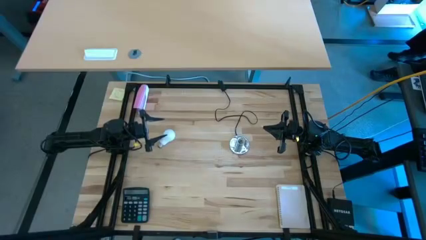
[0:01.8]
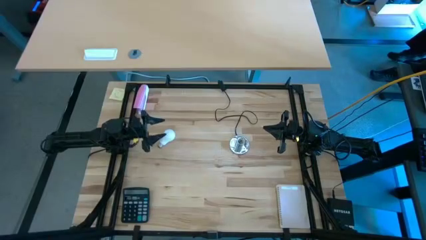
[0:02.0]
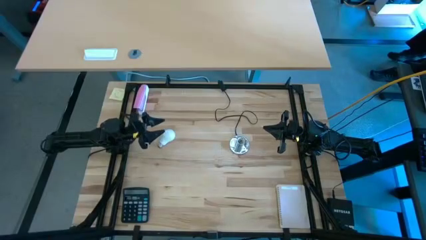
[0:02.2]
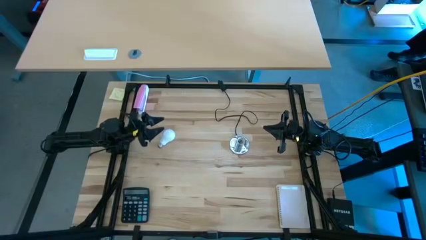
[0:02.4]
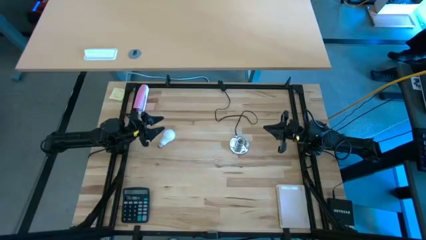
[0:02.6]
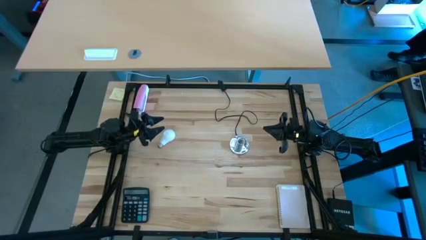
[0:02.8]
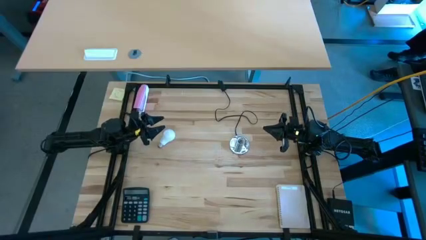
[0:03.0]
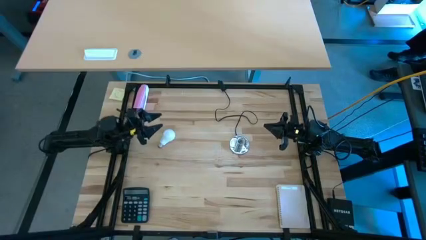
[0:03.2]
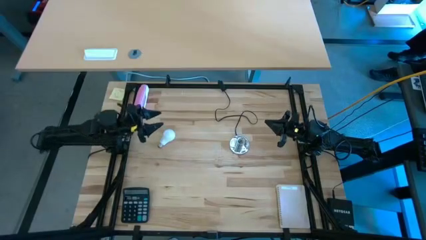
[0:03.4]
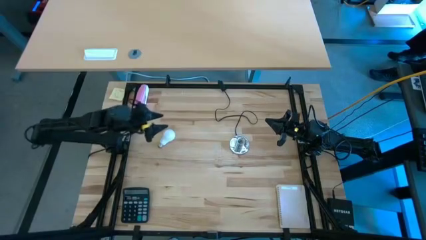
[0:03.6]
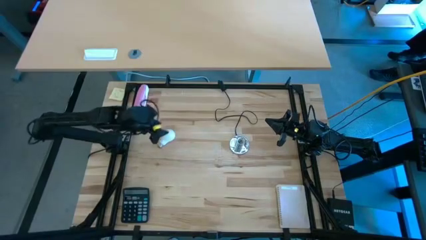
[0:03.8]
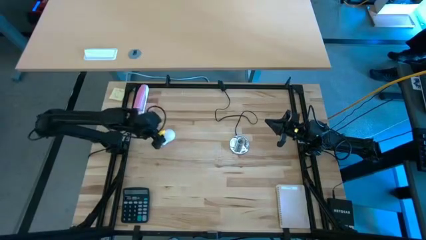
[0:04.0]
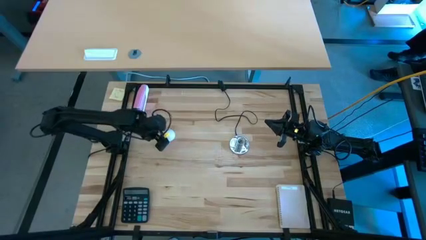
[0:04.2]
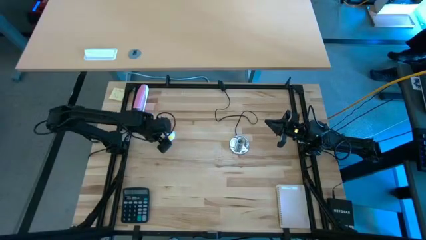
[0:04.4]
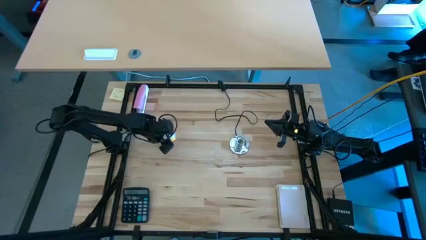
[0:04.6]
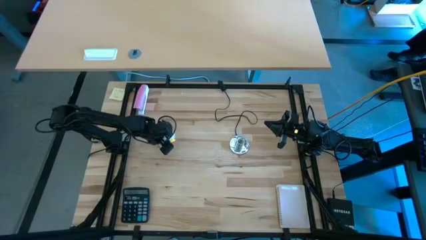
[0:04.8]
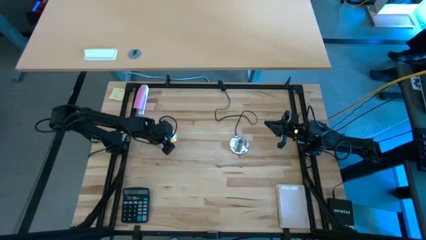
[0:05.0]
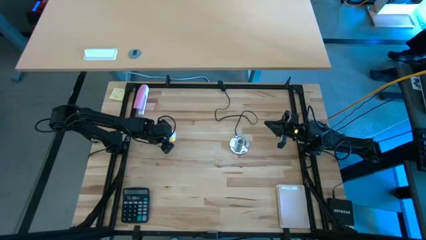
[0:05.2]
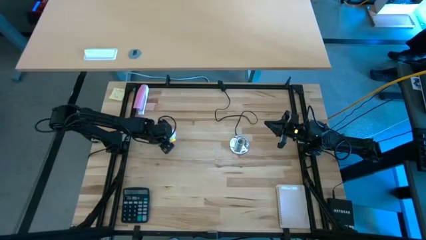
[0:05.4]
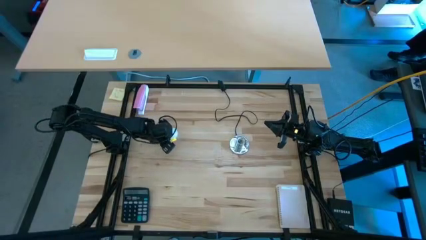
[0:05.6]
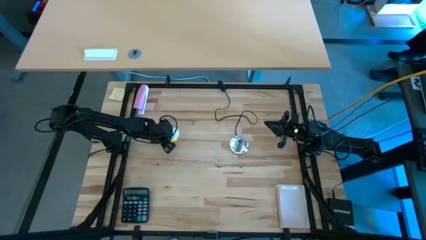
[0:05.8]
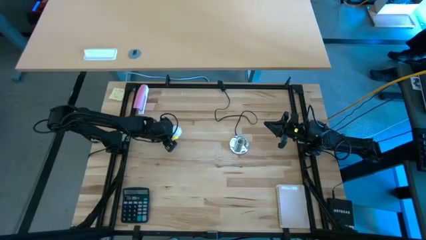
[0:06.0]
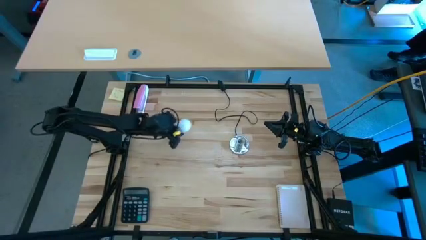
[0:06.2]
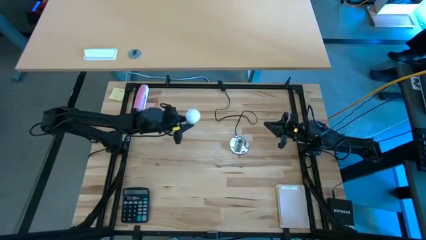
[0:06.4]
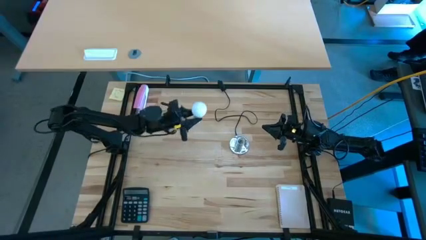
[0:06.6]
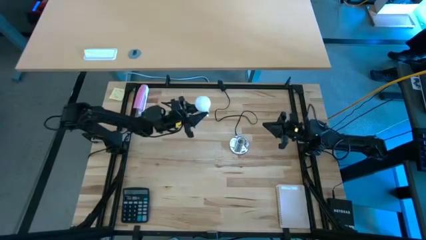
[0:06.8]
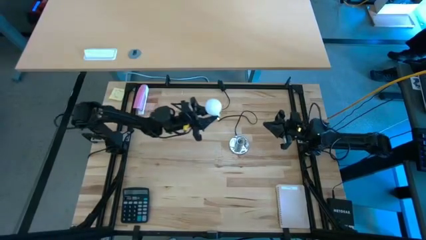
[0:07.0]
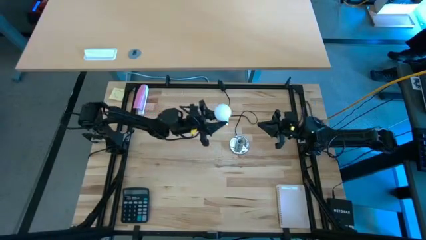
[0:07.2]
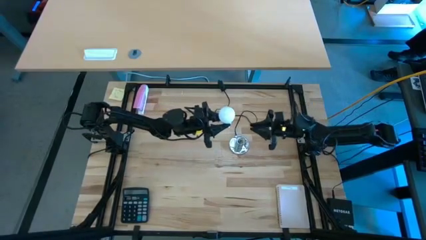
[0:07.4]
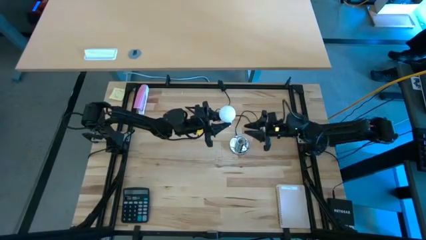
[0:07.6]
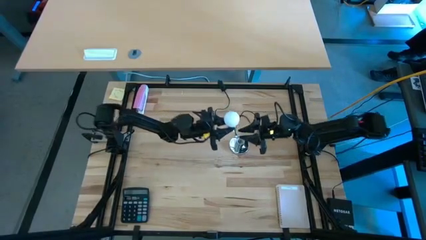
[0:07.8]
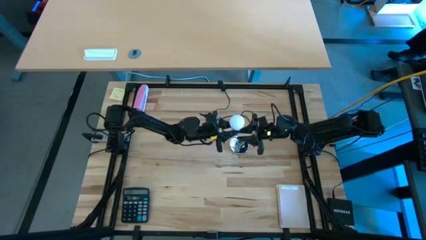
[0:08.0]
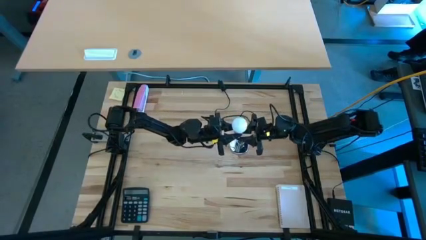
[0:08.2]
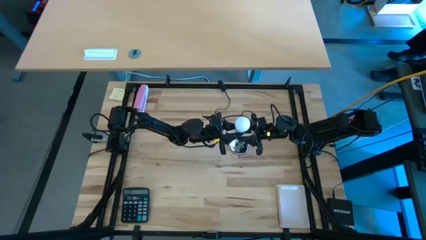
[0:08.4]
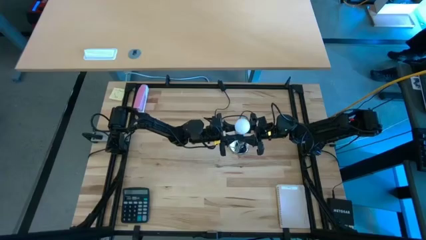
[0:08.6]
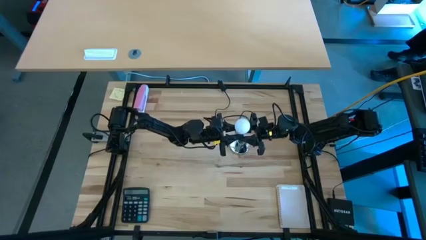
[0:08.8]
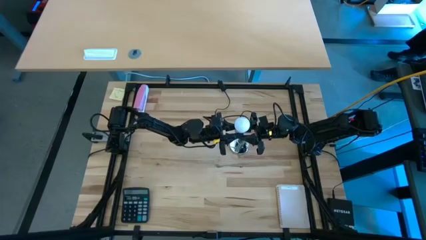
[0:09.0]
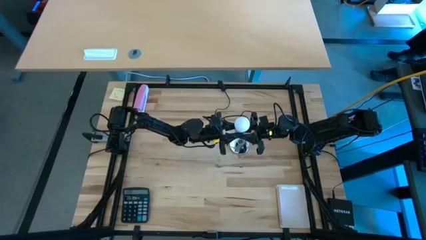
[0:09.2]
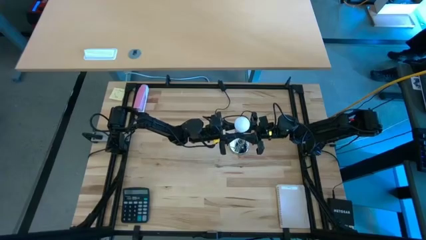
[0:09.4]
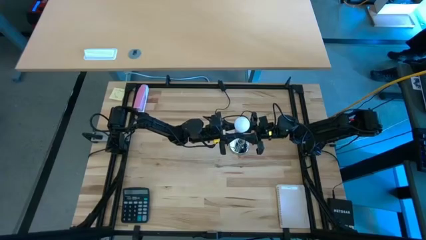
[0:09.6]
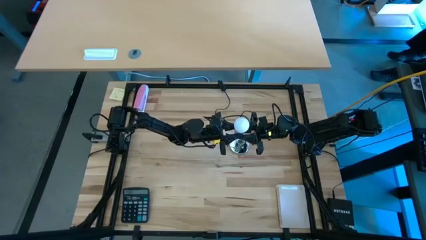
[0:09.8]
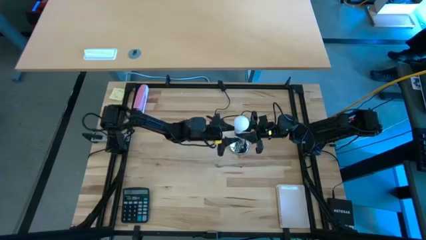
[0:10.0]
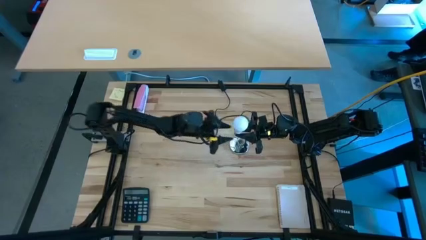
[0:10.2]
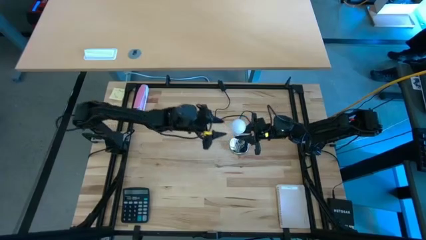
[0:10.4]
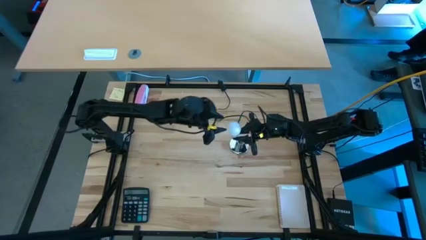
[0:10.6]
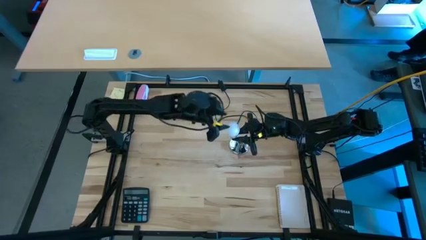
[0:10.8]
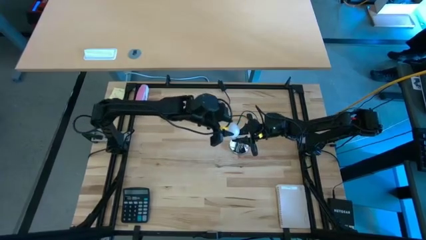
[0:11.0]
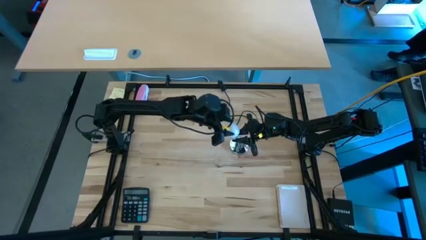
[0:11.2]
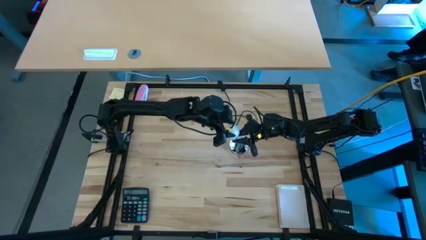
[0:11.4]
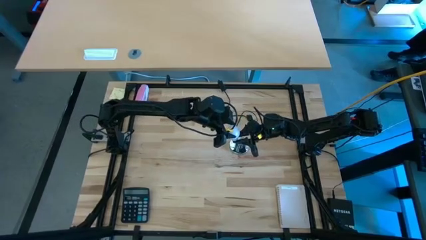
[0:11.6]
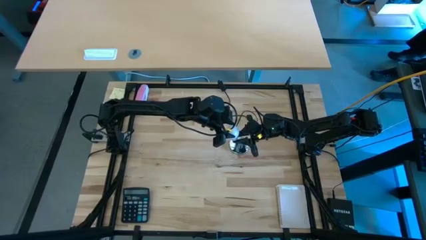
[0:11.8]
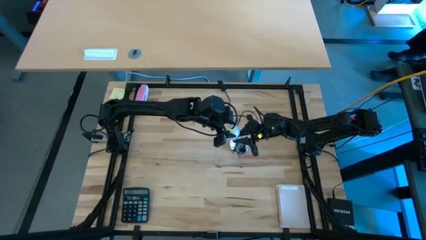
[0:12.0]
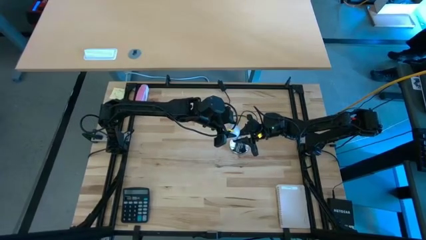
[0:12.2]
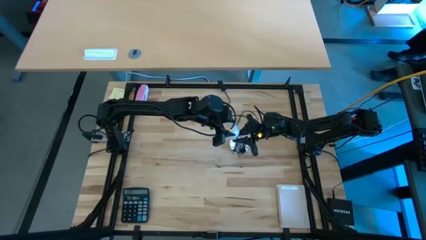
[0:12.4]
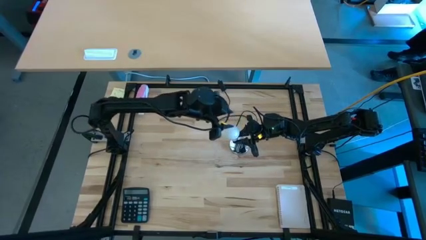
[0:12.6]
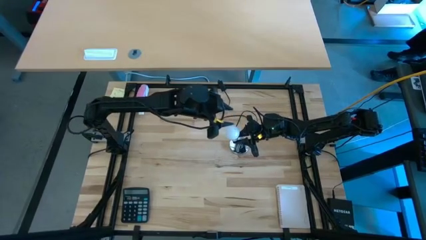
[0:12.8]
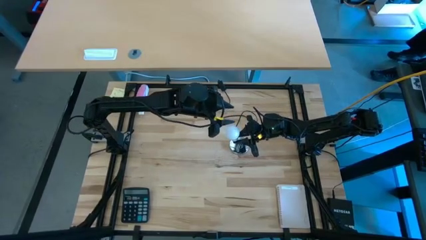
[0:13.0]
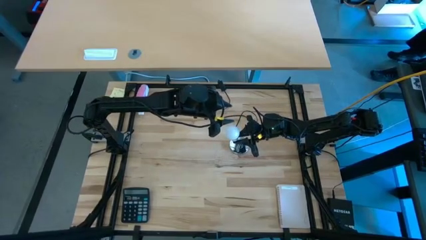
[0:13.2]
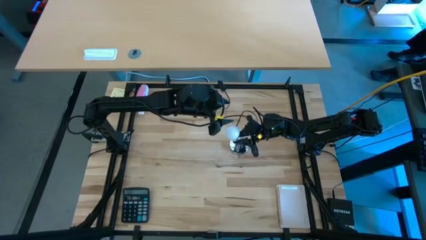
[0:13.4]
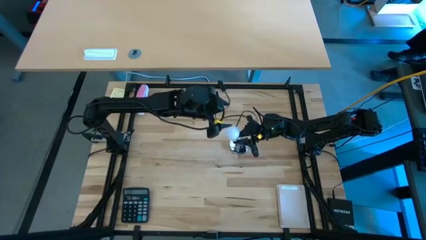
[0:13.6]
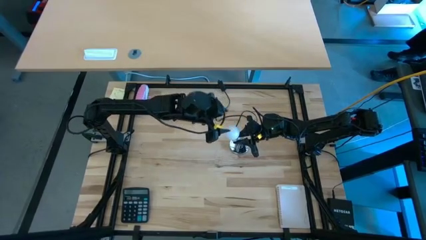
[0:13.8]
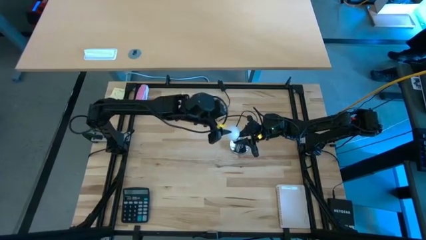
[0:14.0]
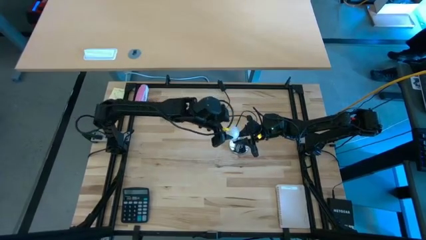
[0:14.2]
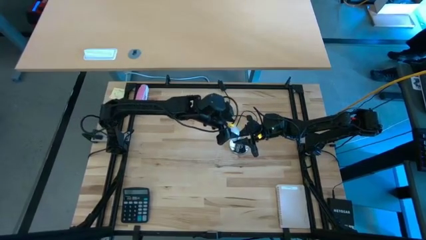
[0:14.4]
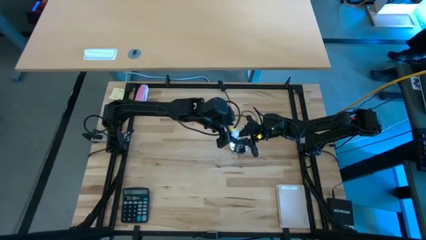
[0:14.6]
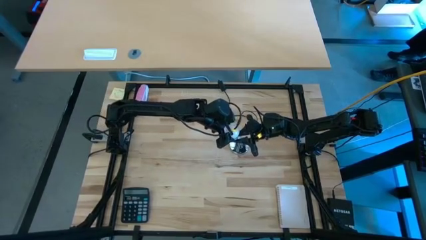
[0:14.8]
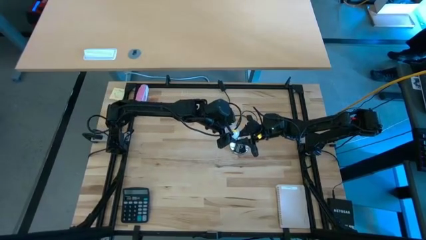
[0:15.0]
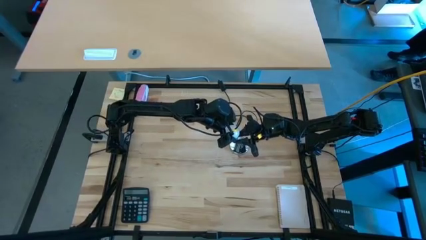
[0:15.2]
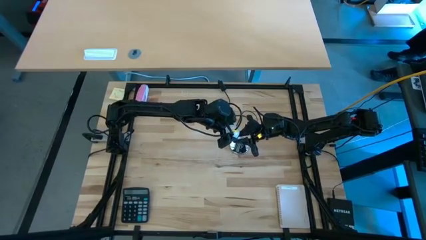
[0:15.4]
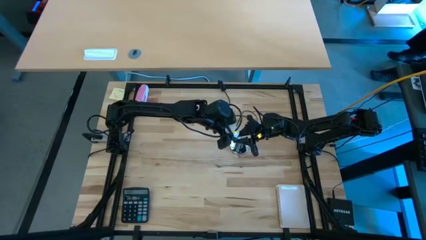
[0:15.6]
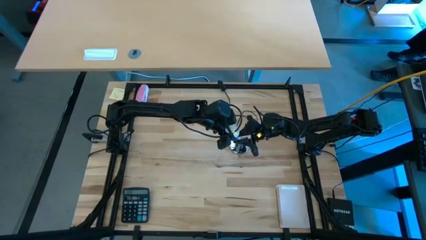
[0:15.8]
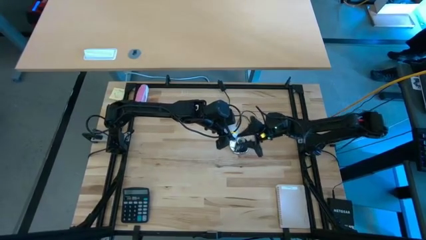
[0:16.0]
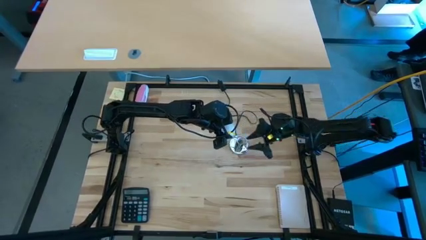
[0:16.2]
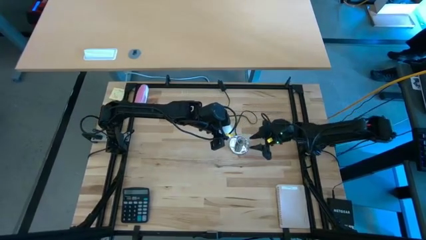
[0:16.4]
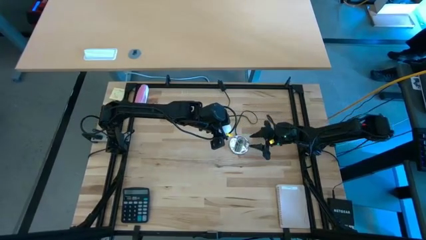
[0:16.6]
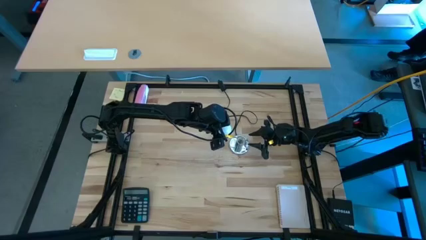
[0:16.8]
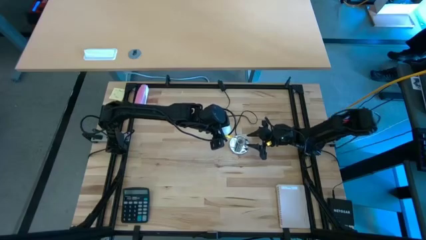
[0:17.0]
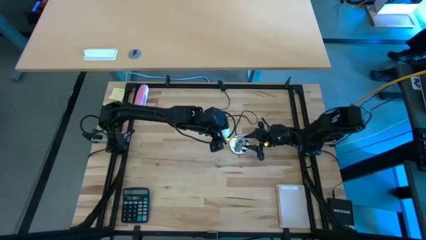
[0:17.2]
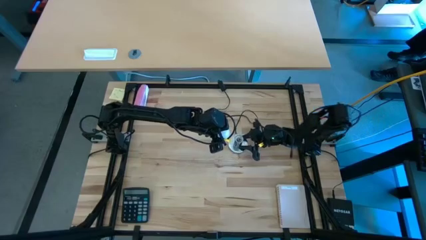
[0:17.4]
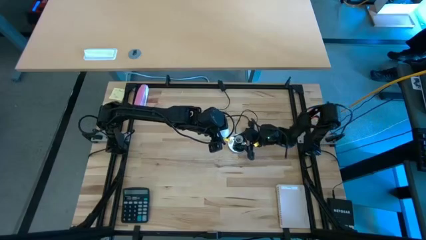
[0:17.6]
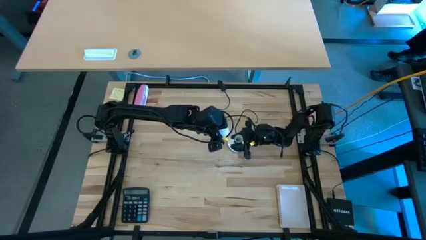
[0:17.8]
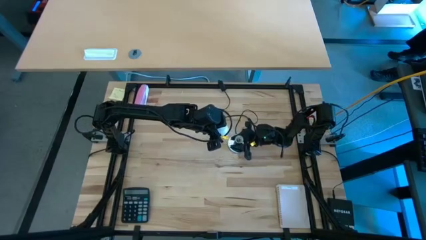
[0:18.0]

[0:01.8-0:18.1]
Task: Screw lightbulb
Insert the lightbulb into the lamp
